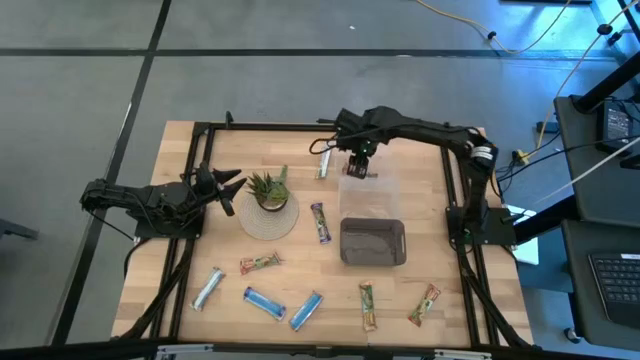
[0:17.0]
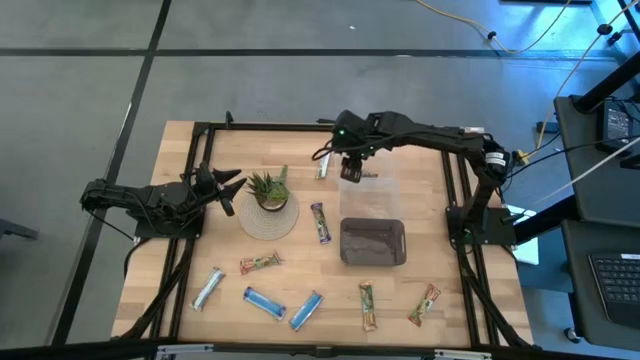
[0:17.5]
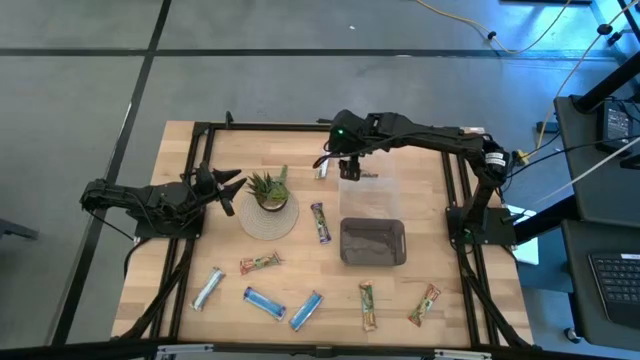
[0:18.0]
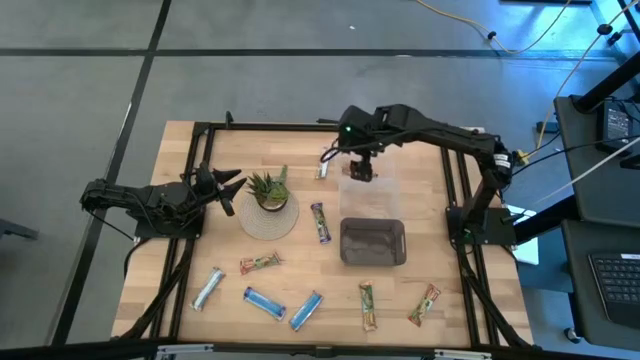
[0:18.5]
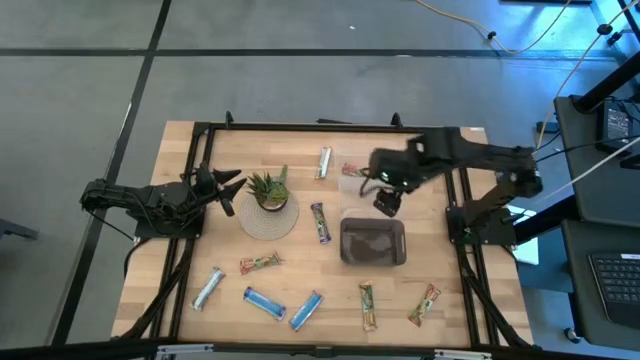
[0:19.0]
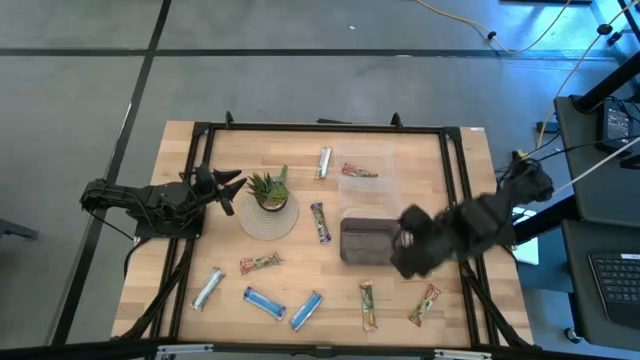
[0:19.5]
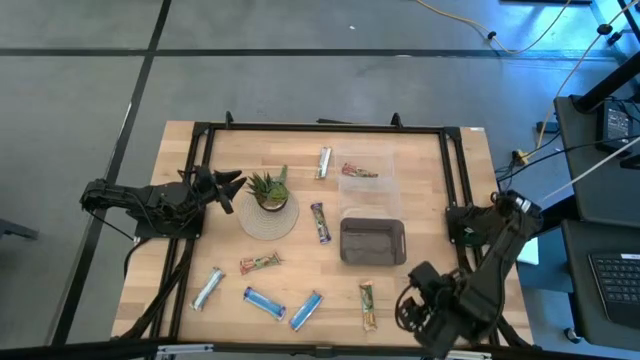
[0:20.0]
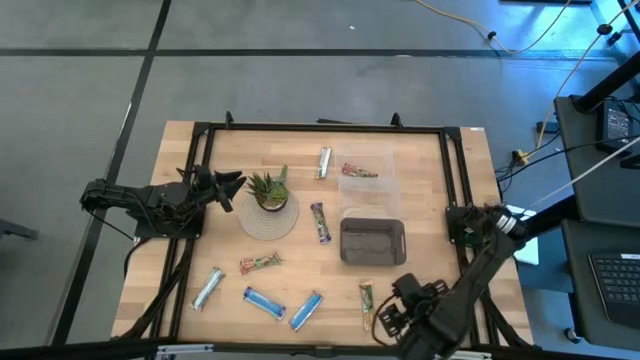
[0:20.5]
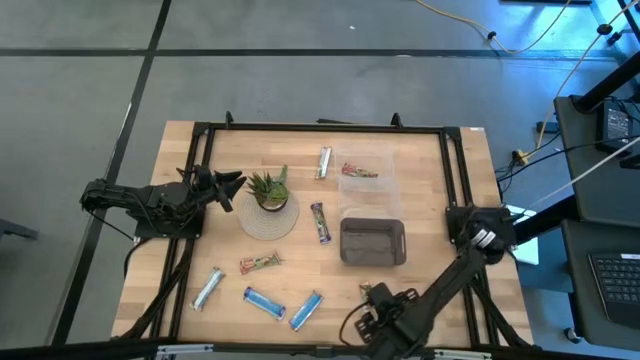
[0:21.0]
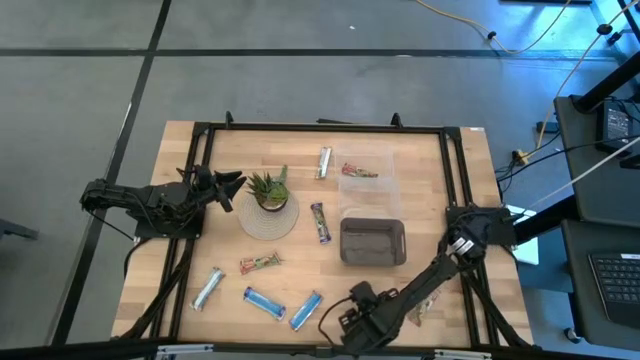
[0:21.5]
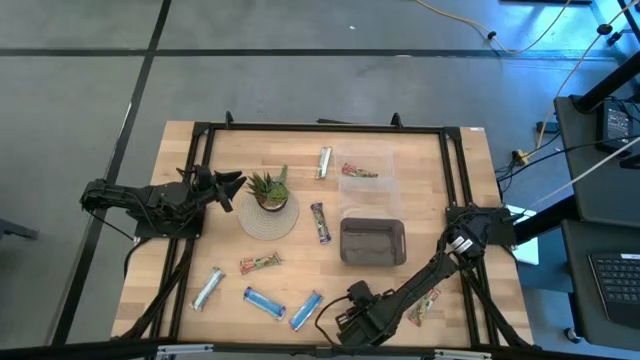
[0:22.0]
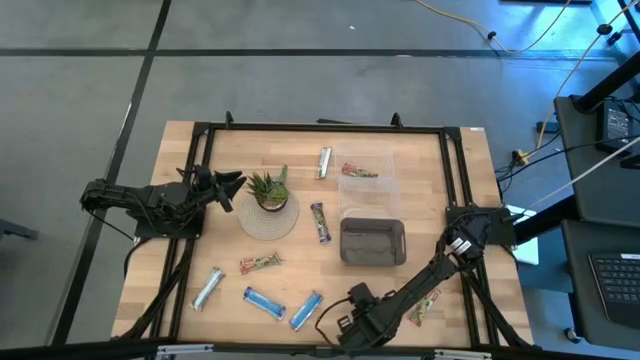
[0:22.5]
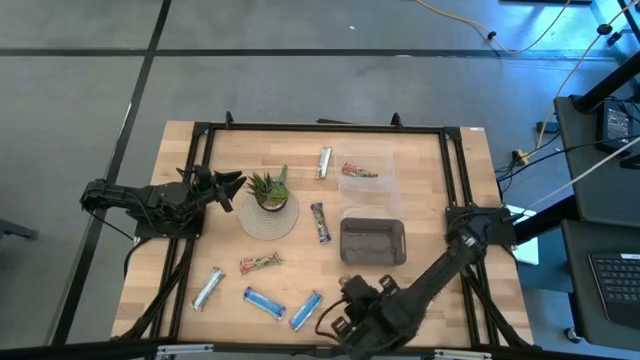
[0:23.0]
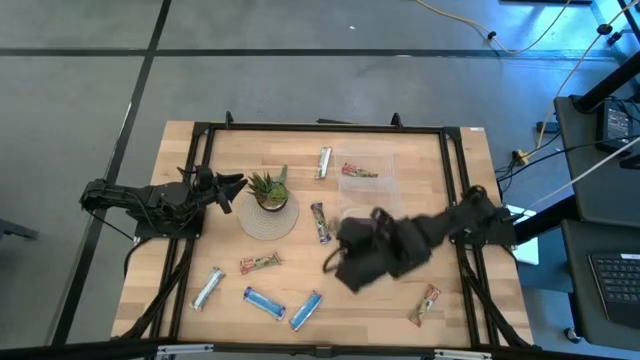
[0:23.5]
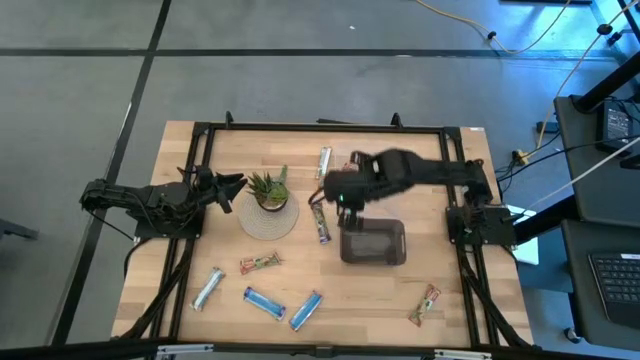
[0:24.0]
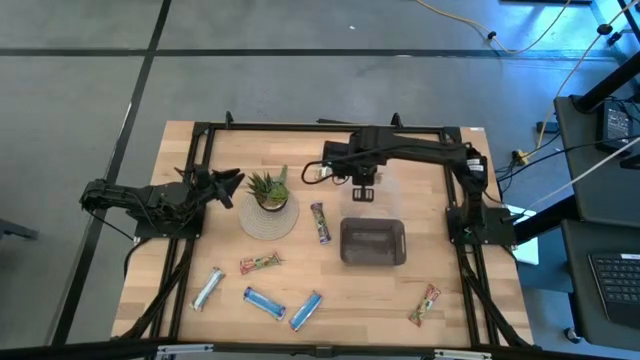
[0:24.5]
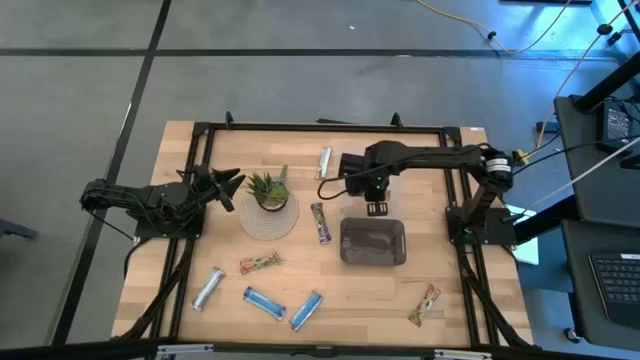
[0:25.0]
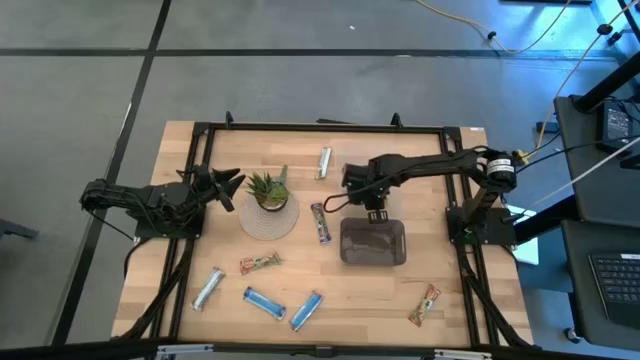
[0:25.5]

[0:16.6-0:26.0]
Task: Pick and place Granola Bars by type
Put the bottom yellow granola bar into the bottom transparent bin

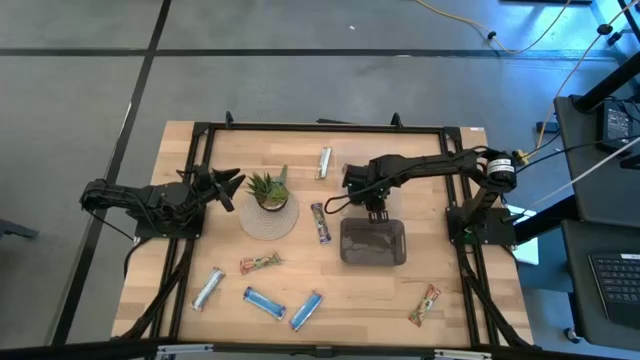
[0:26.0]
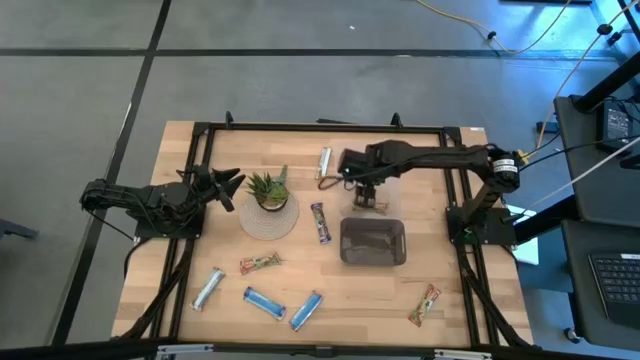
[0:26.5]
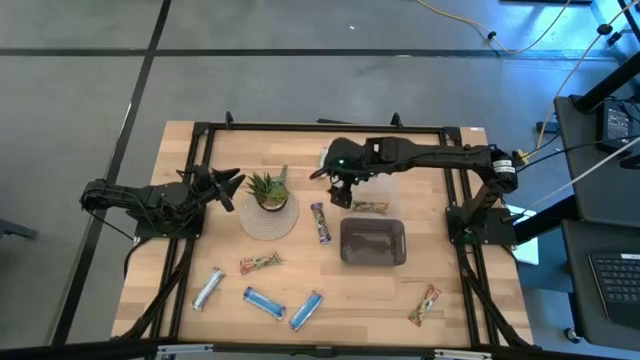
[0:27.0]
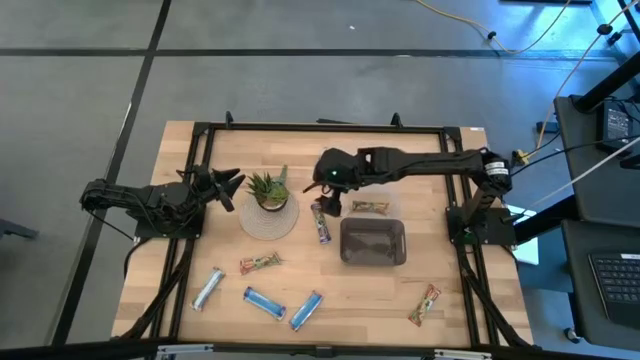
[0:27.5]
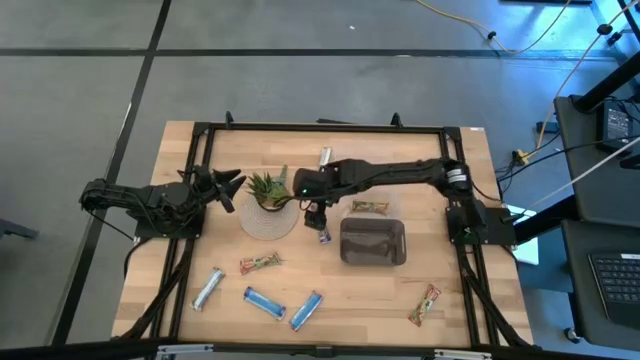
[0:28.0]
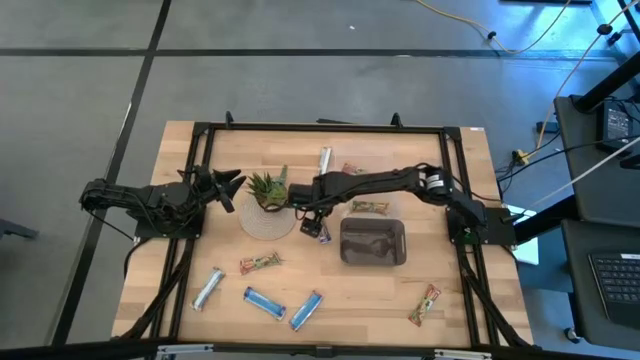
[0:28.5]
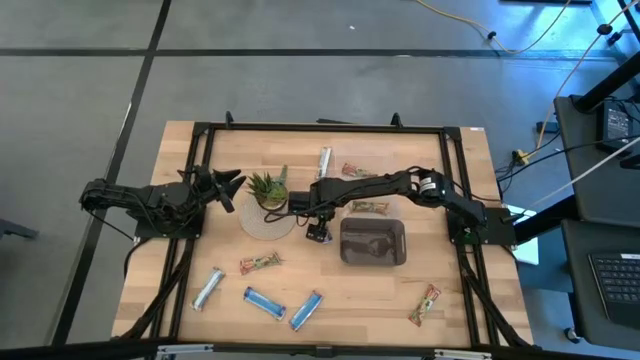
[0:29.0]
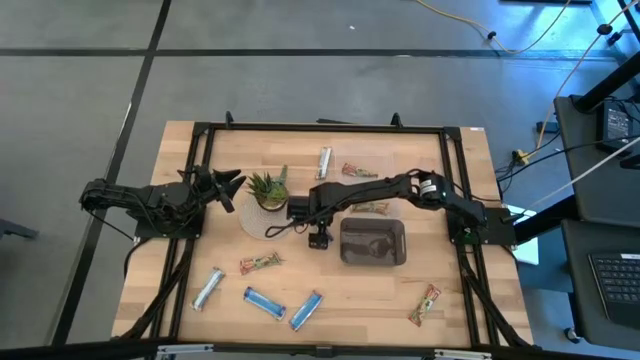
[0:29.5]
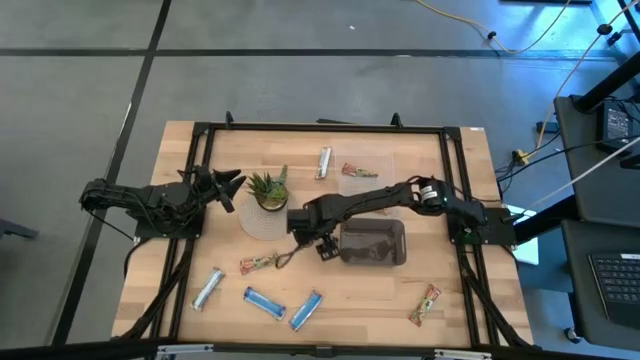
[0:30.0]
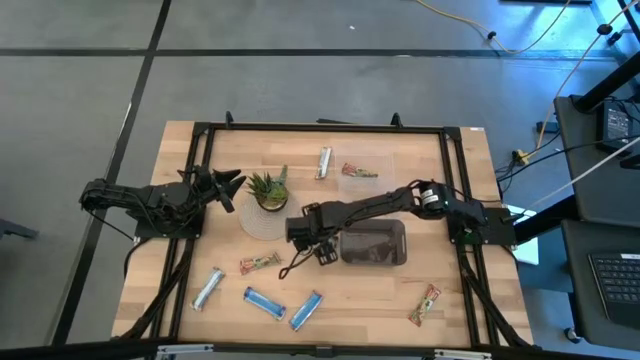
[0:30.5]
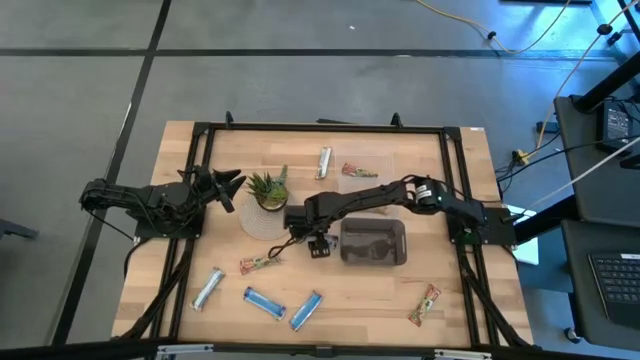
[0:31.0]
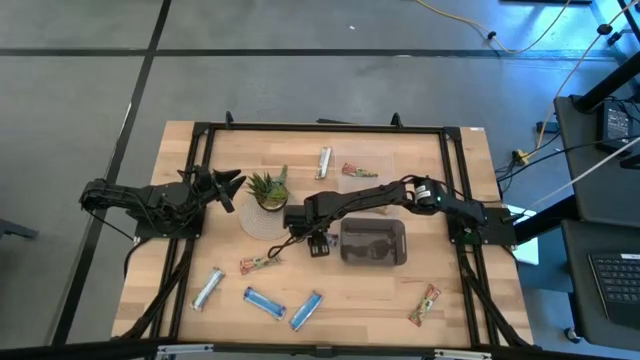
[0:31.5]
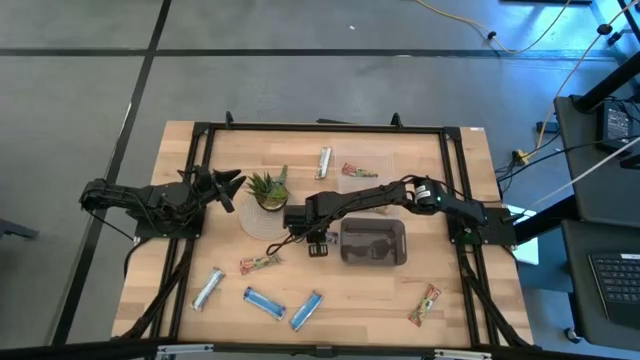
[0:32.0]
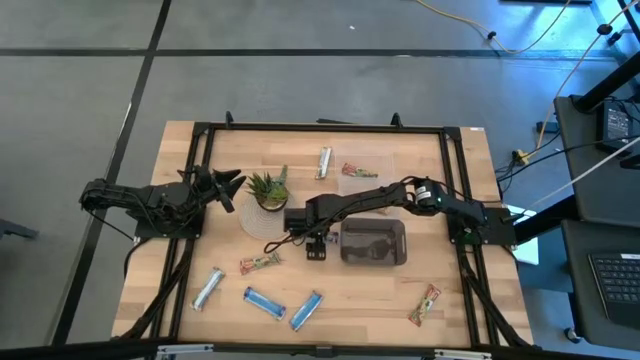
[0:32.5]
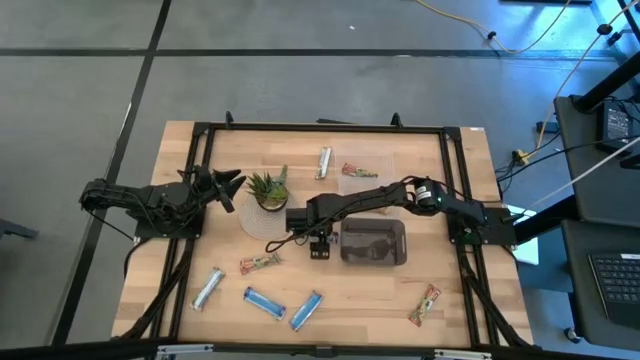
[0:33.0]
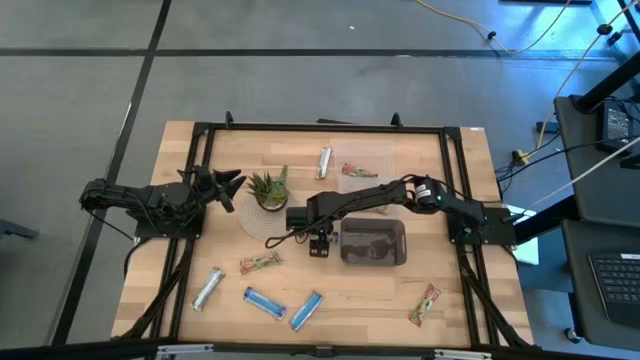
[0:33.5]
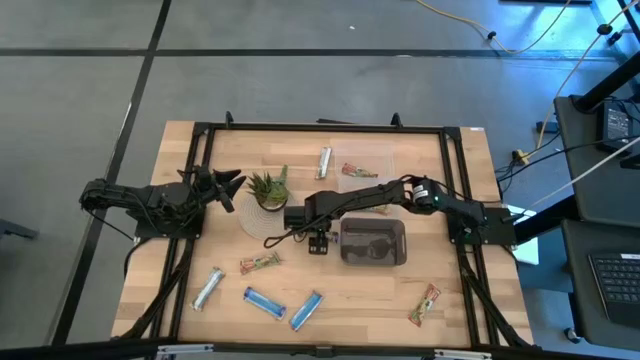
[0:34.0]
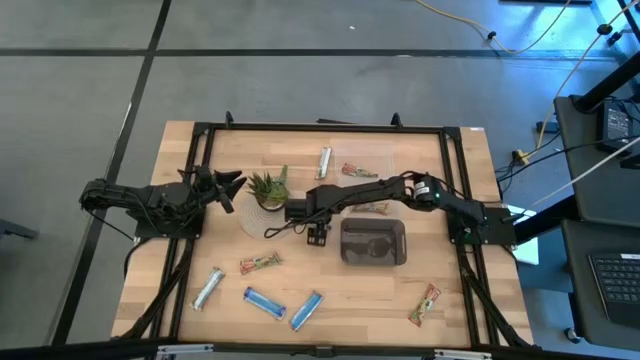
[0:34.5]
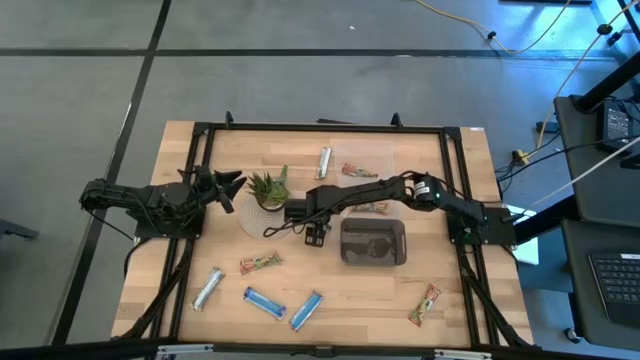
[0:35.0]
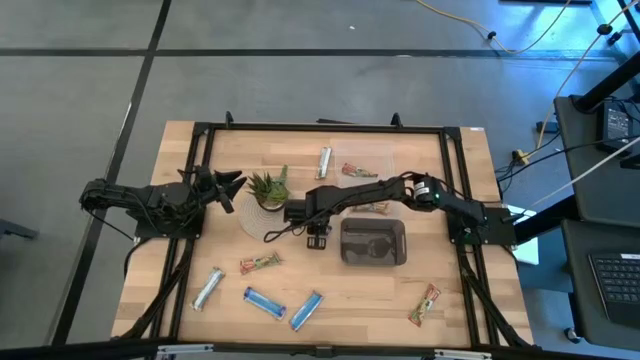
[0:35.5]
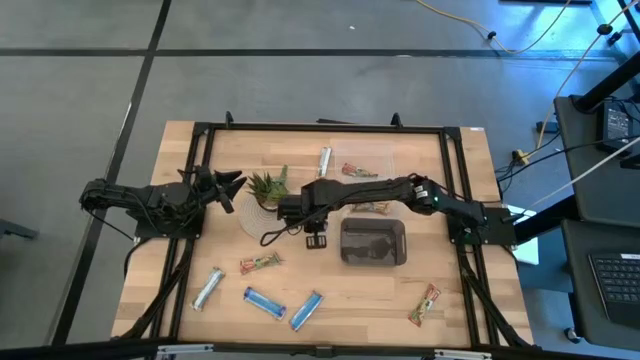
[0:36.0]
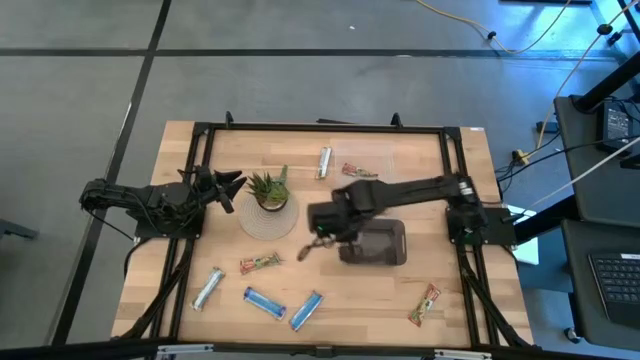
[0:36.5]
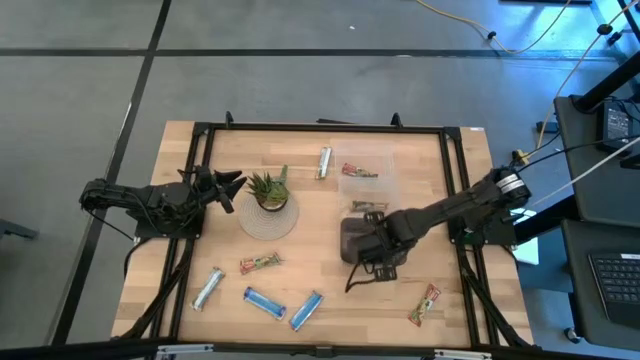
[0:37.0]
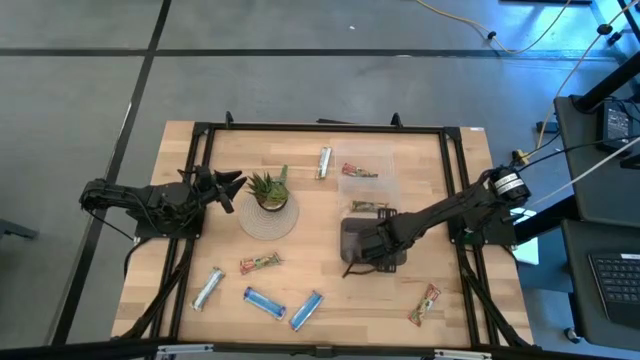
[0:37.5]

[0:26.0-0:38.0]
Put the top blue granola bar into the black bin
